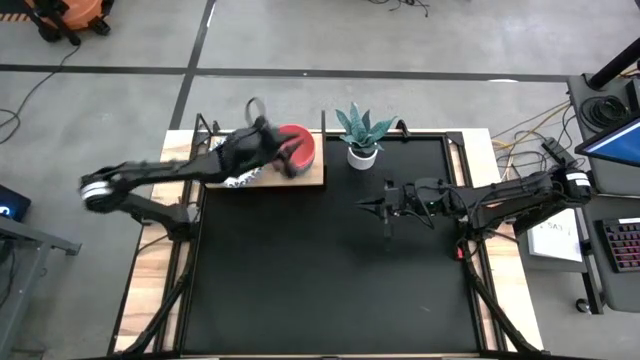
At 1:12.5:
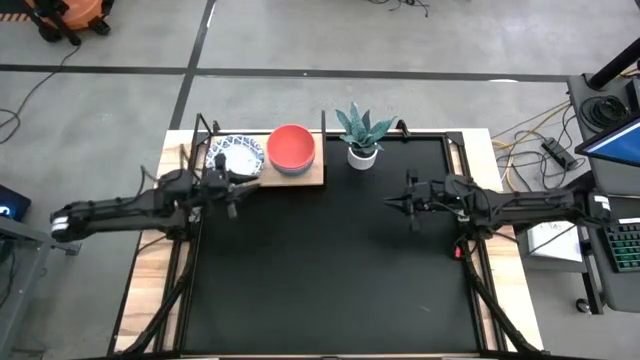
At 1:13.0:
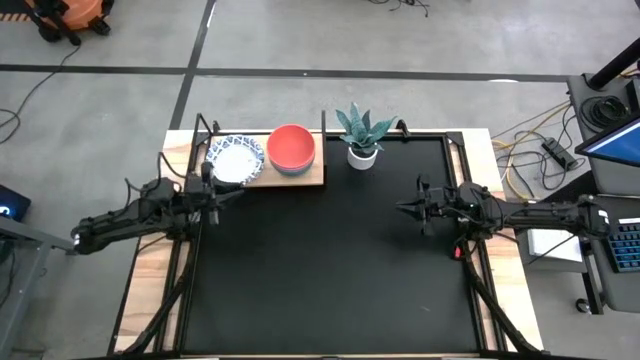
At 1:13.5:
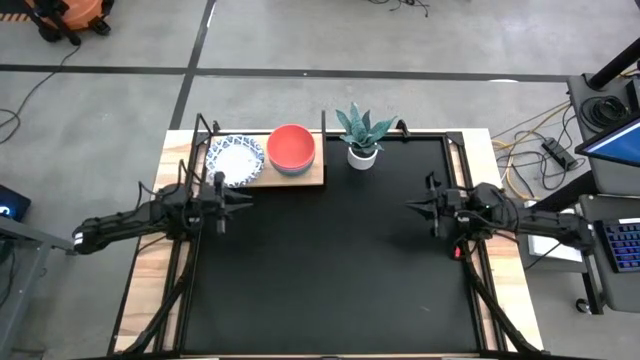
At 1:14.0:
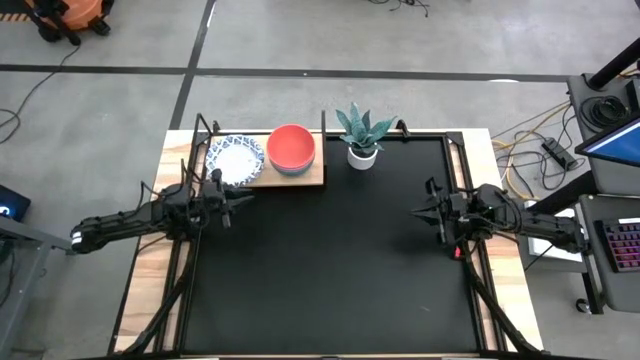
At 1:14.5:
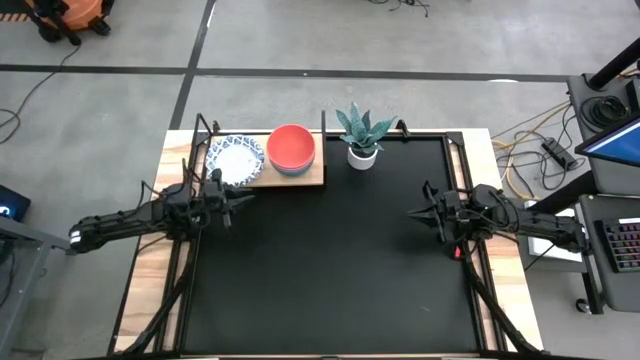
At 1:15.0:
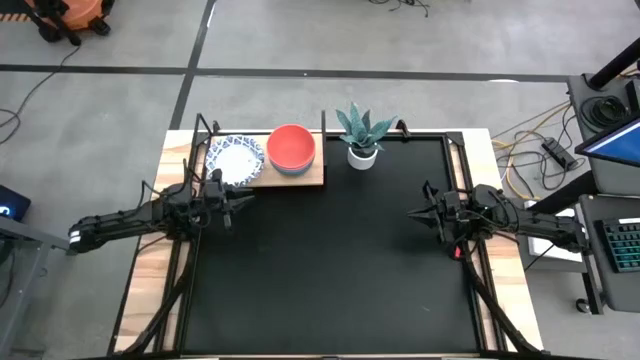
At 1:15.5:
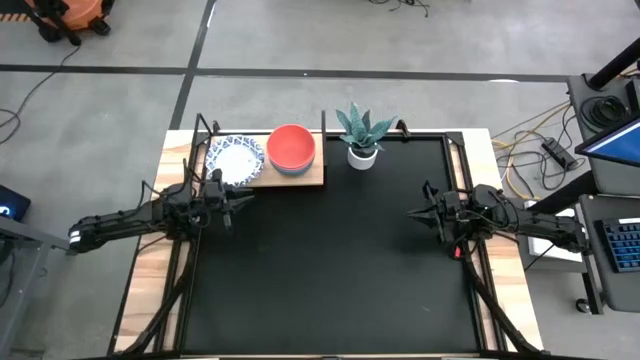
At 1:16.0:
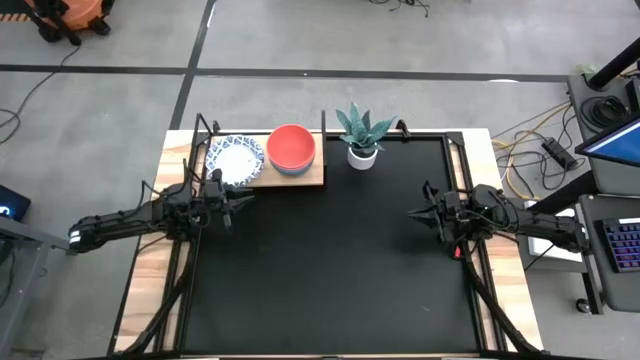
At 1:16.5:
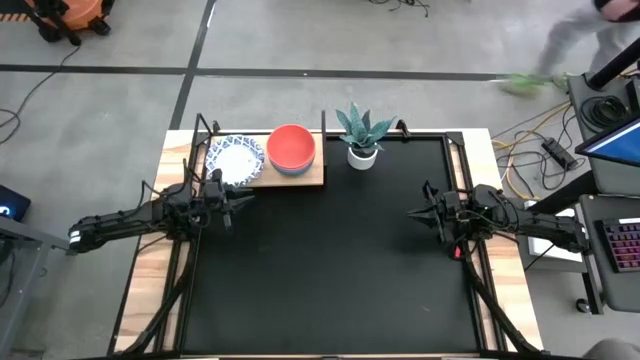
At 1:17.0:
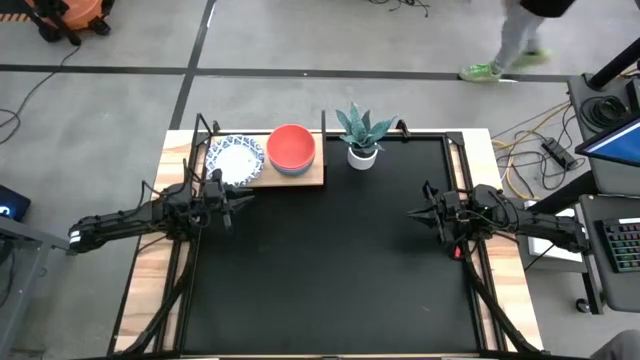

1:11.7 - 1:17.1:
Task: Place and stack bowls onto a shelf
Return to Home Position

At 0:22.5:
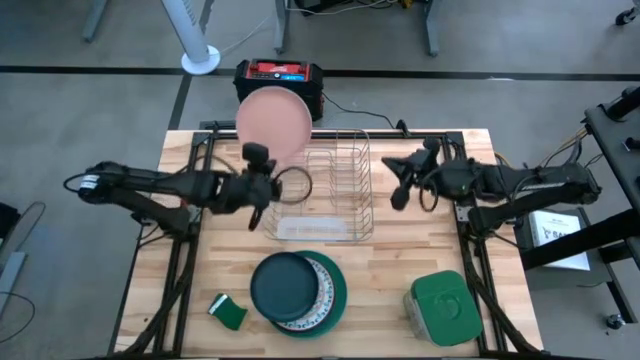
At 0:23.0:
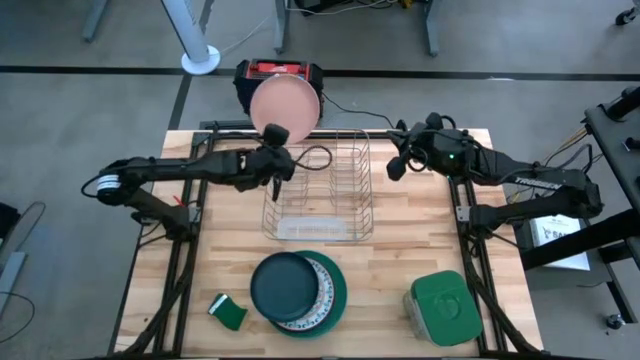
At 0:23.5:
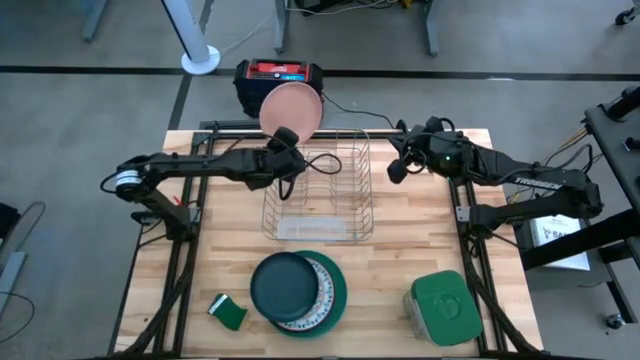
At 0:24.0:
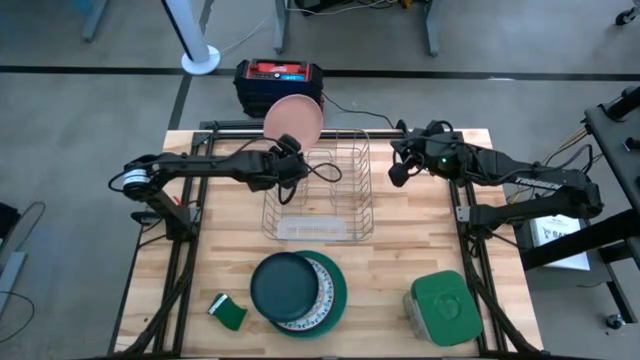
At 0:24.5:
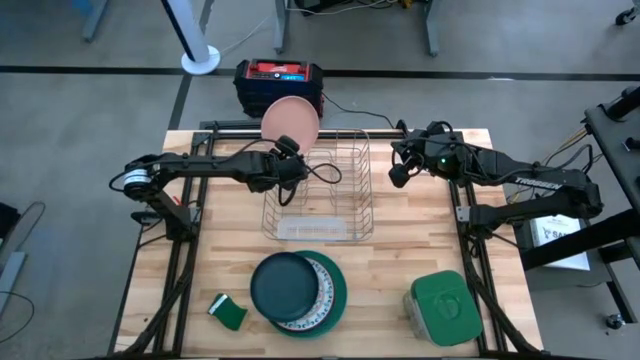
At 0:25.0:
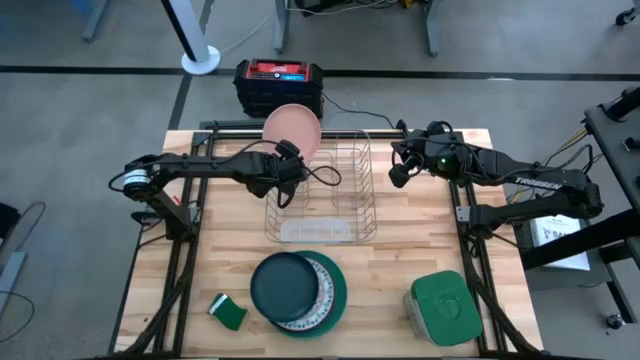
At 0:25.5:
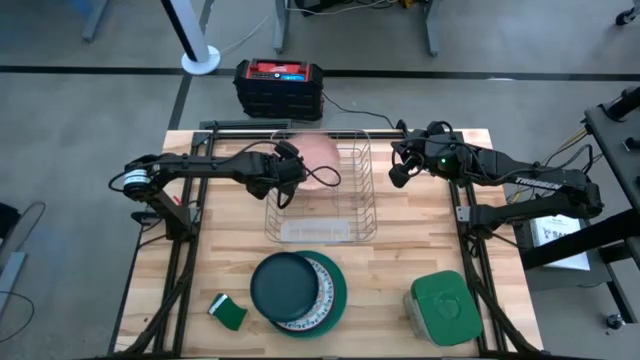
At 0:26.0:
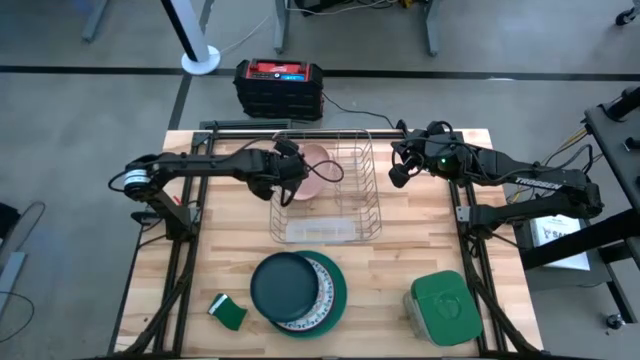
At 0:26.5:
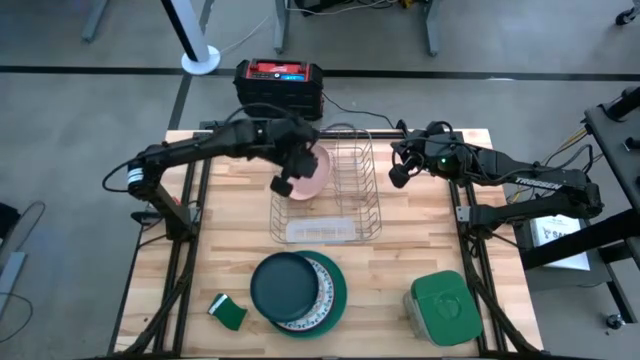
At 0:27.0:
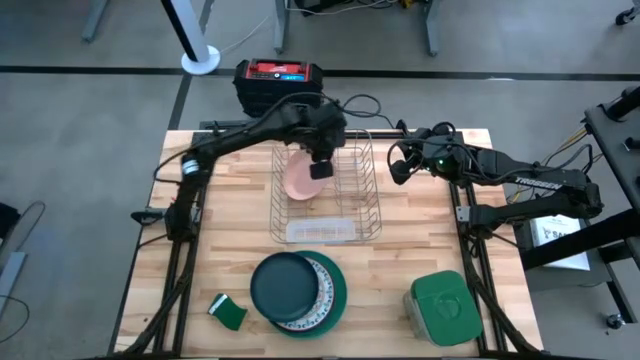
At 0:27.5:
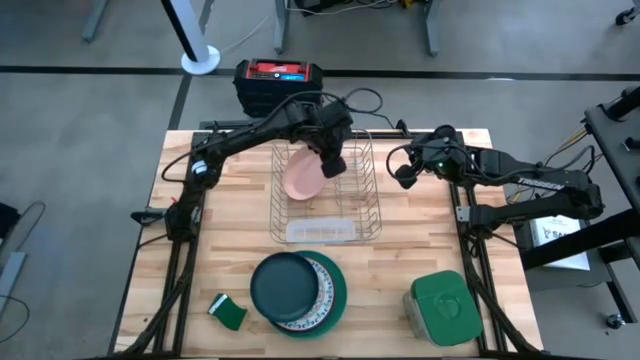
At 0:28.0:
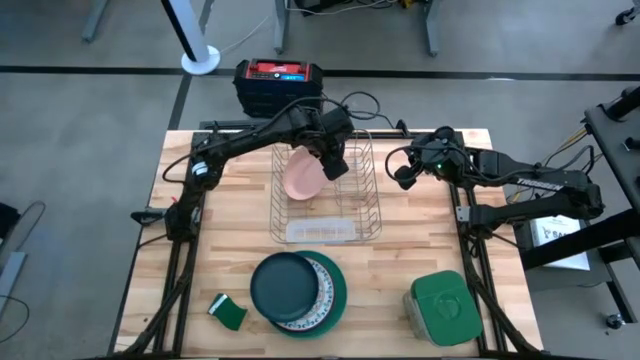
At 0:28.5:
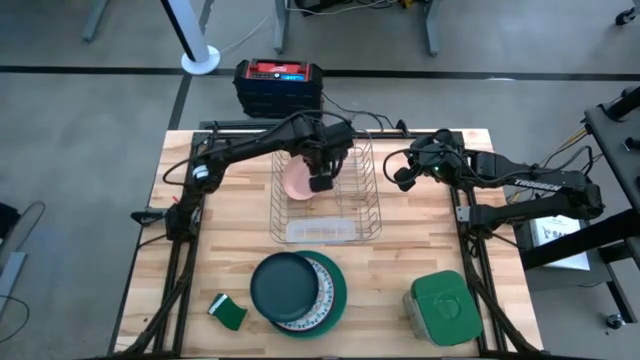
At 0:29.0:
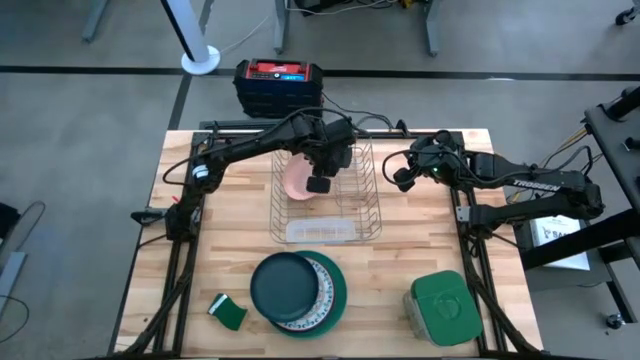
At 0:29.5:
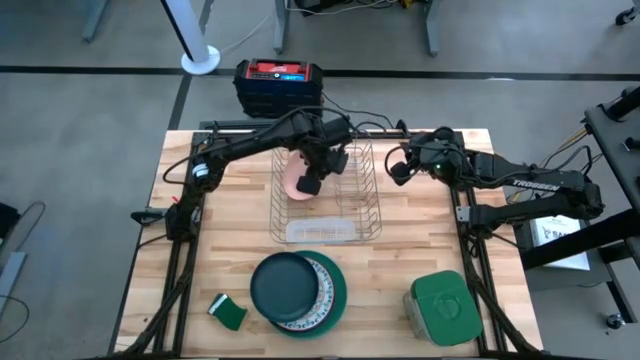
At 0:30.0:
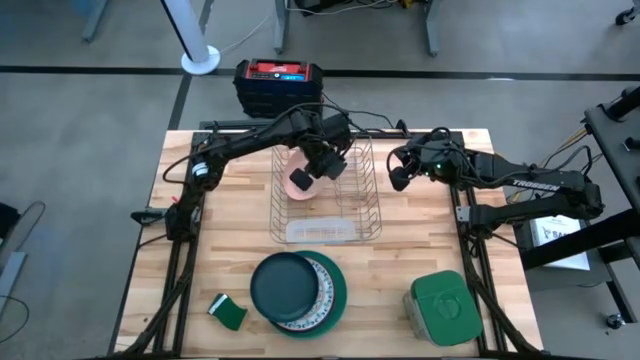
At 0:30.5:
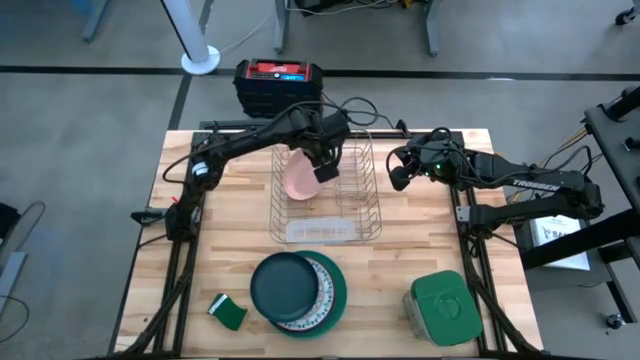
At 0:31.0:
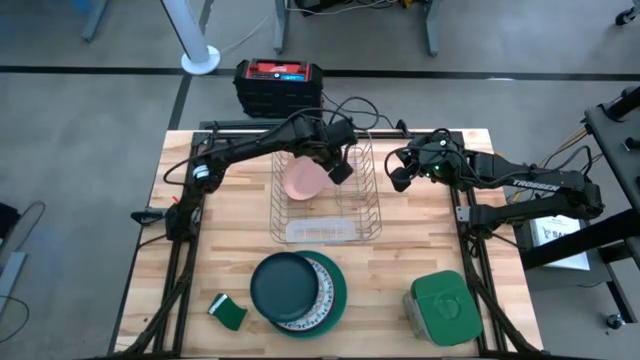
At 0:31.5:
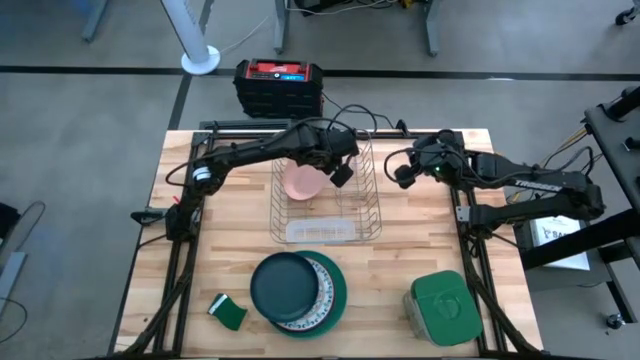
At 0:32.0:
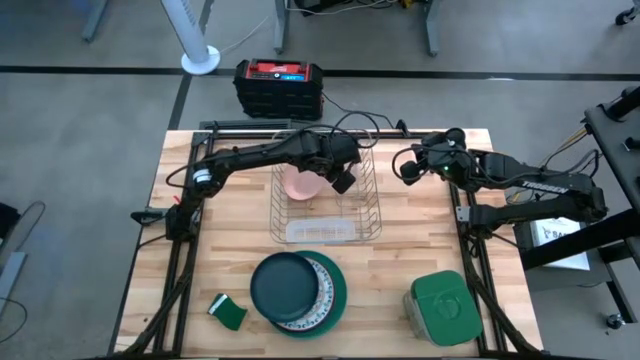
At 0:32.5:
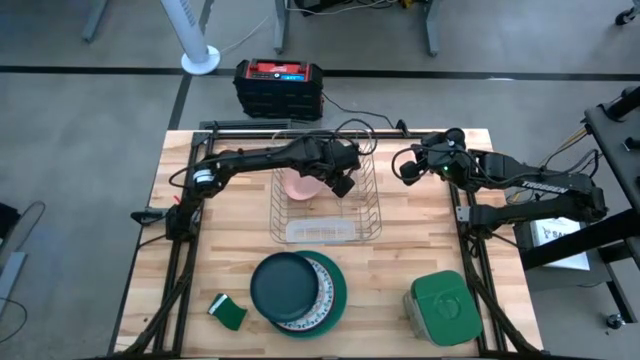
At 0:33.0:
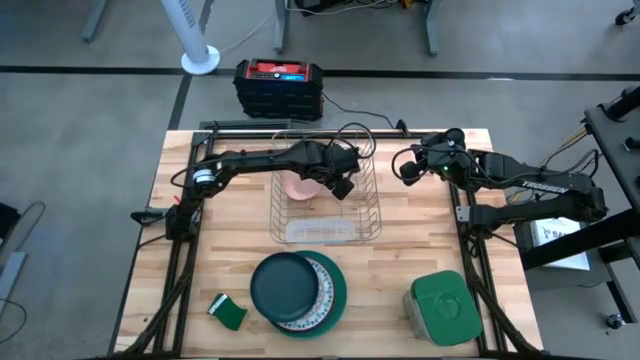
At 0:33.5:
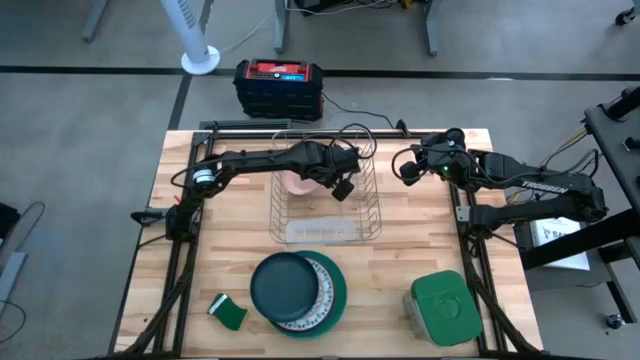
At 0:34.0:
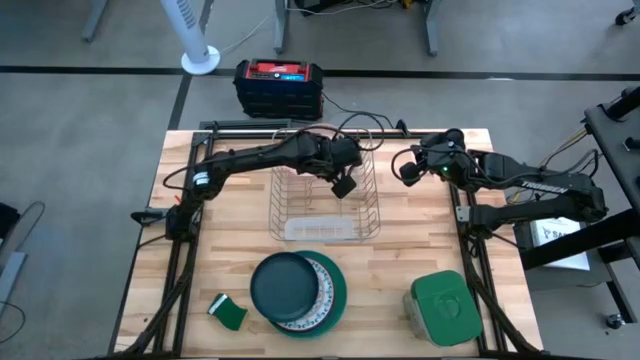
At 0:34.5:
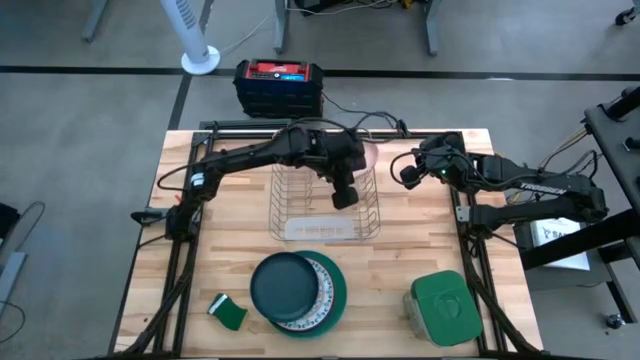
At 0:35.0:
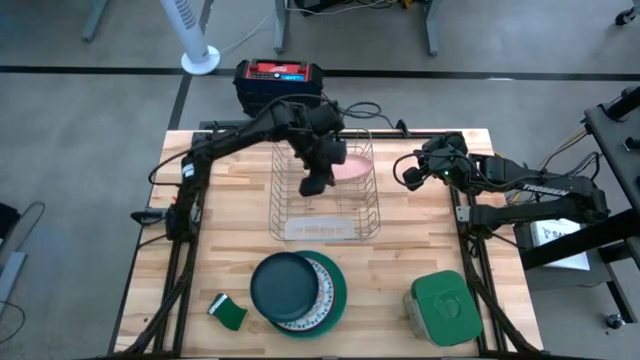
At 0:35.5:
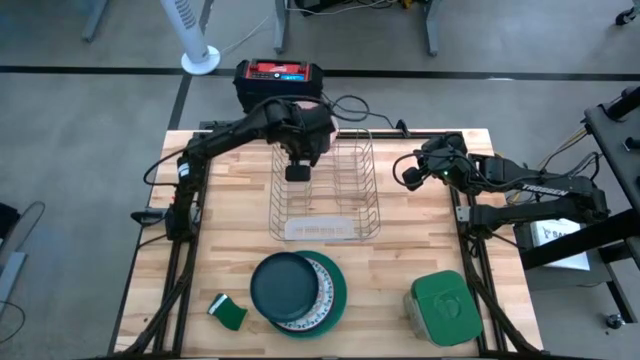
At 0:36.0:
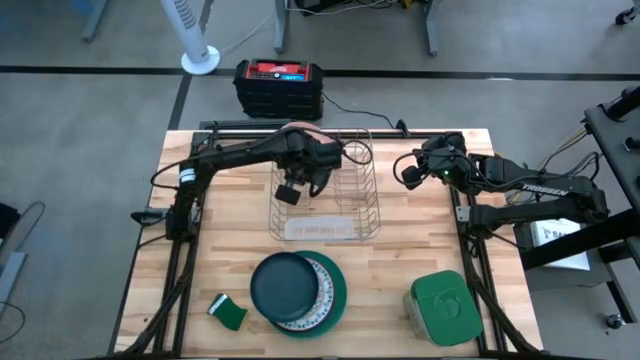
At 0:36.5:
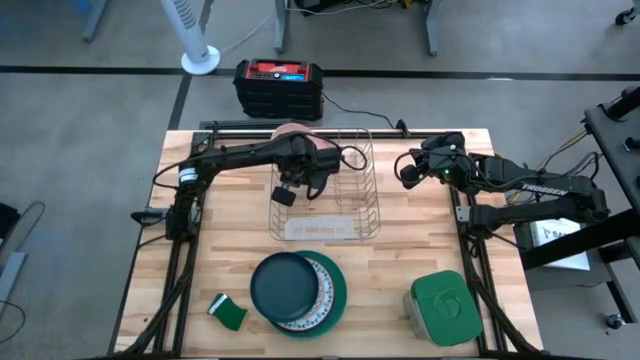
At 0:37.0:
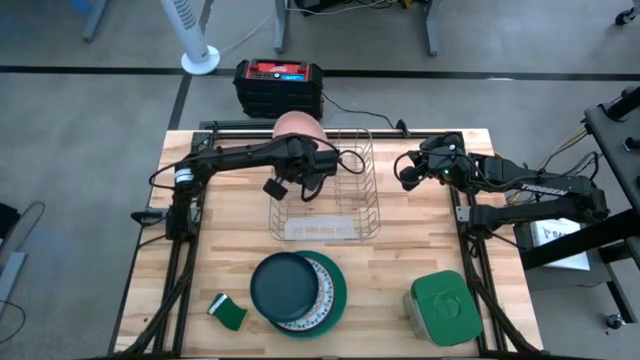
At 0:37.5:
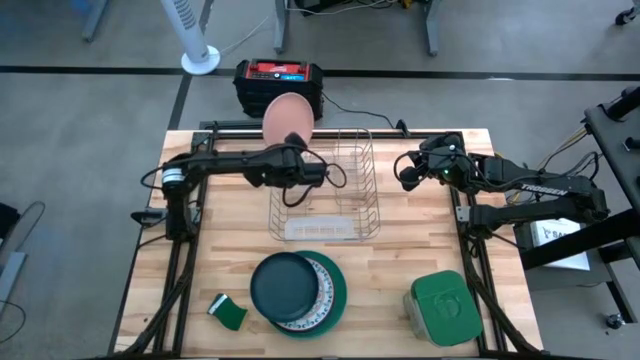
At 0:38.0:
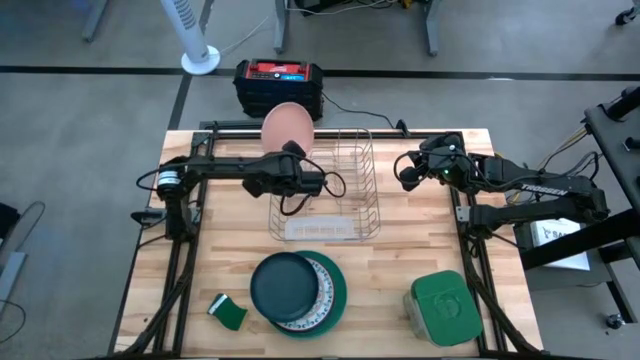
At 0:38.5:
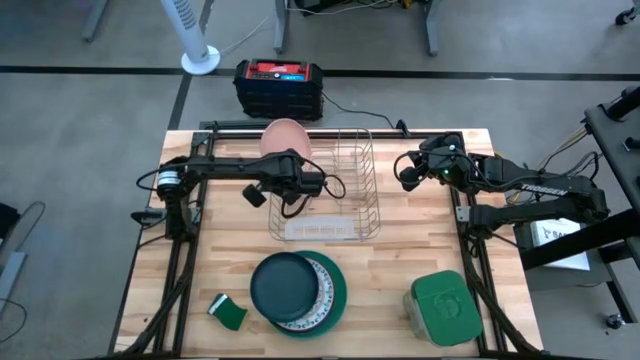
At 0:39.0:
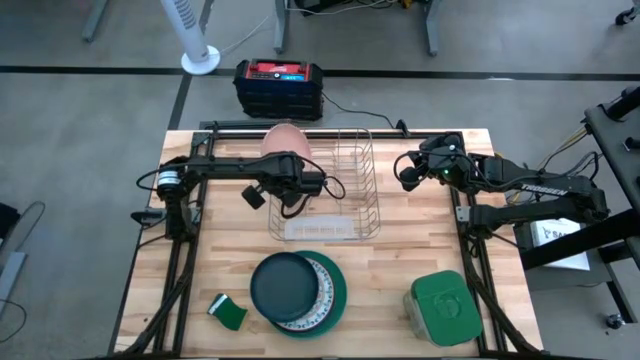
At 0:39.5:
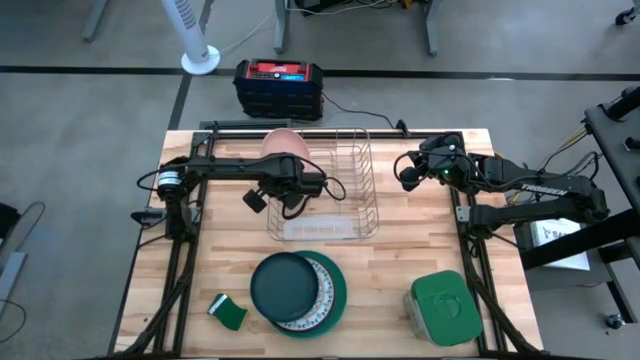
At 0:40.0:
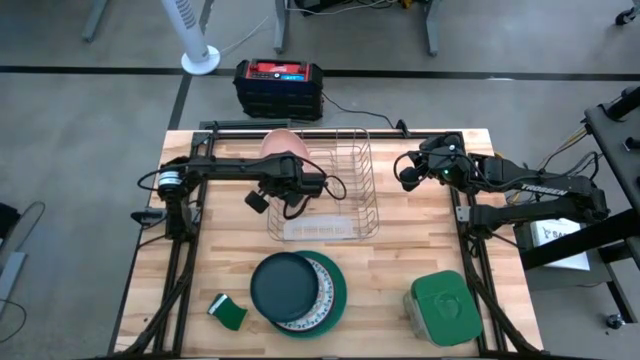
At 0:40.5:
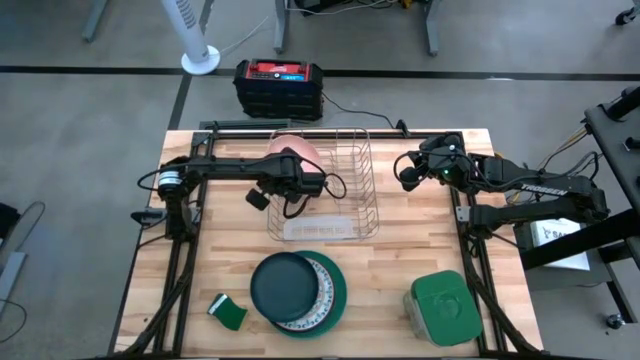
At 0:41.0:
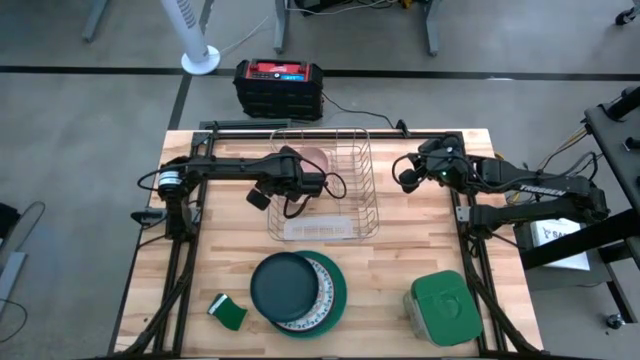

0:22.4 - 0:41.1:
Task: Sort dishes
Put the pink plate in the dishwasher rack
